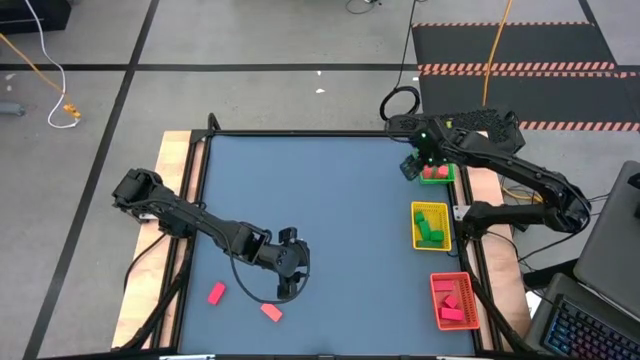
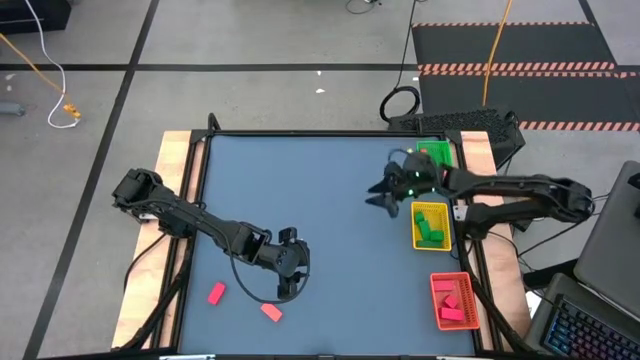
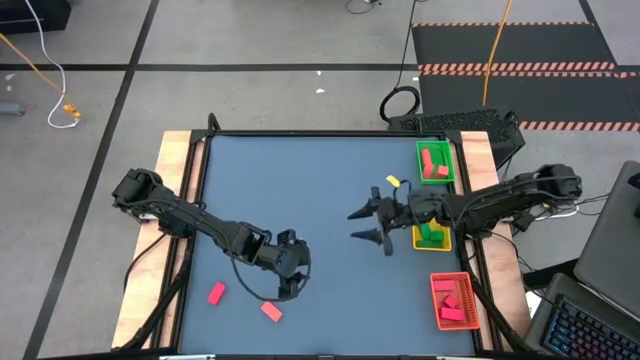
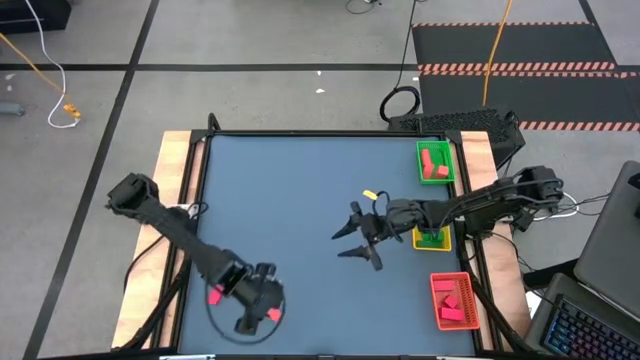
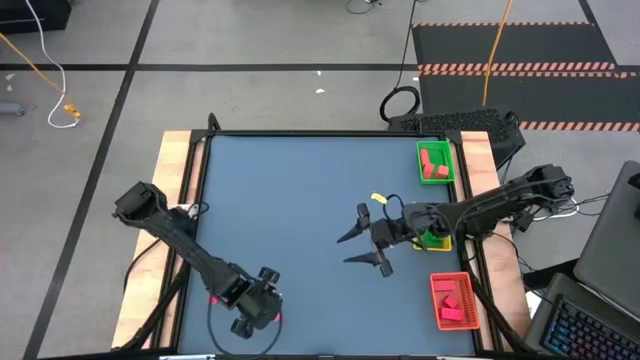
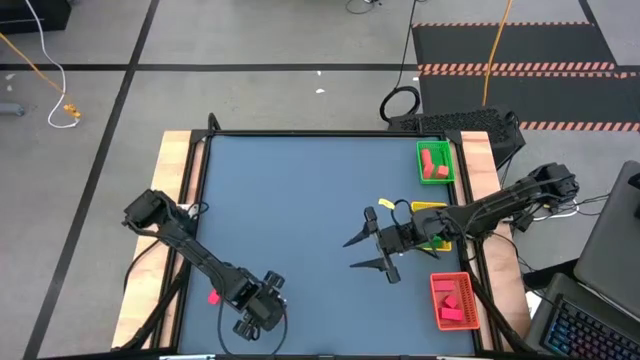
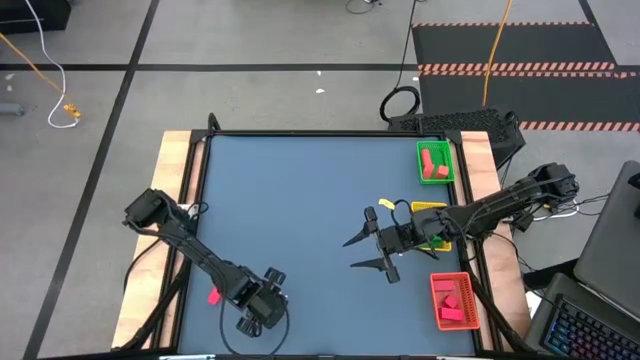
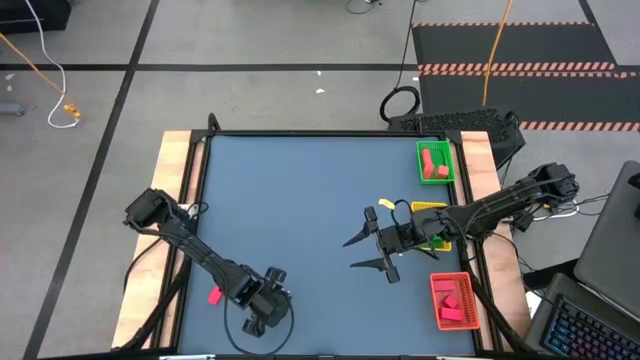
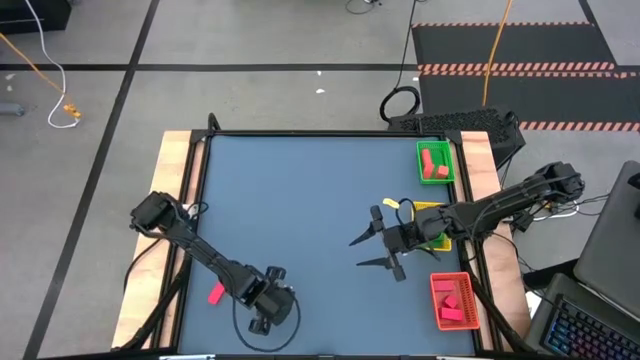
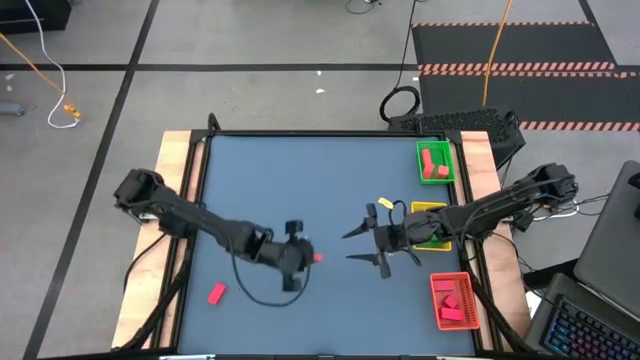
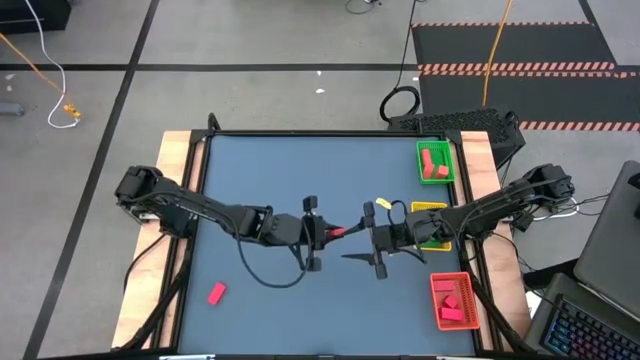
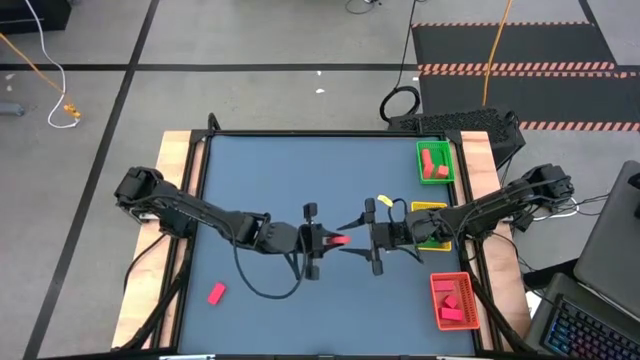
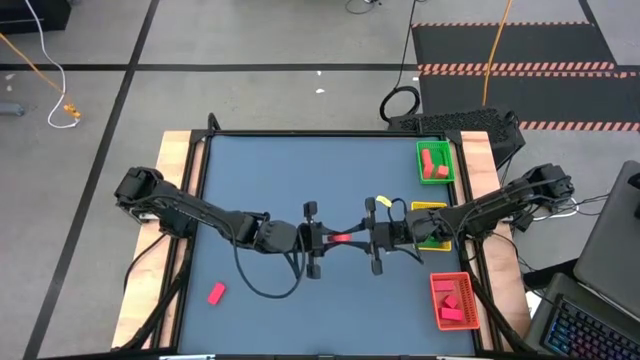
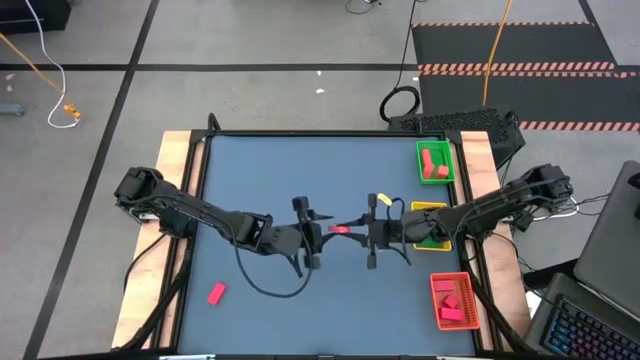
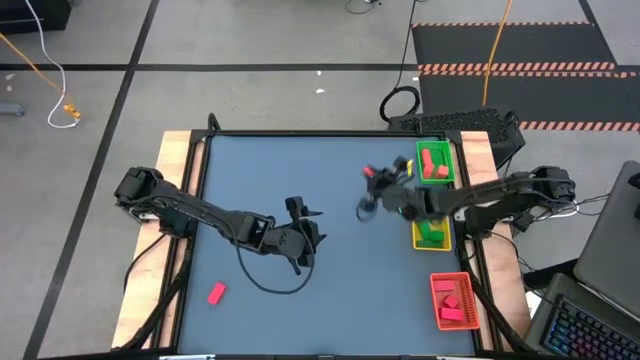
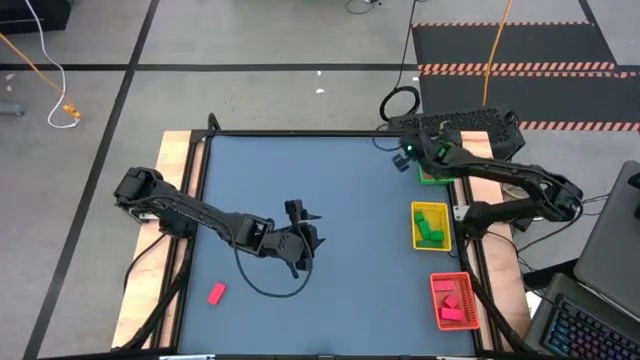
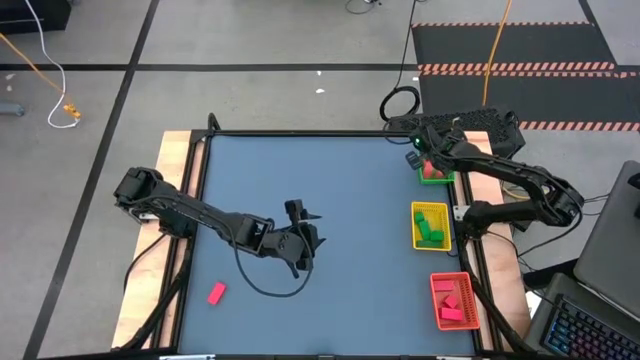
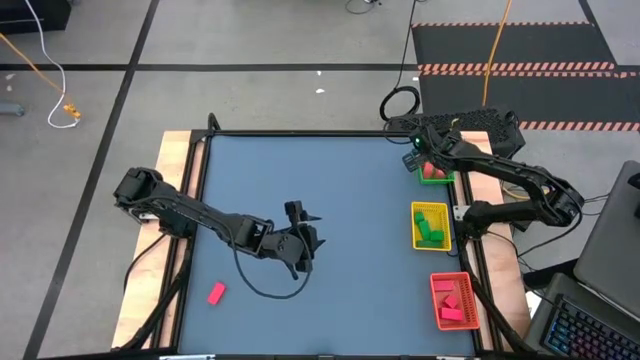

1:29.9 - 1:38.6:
Task: Sort & place blocks by color
Put orange block into the green basket

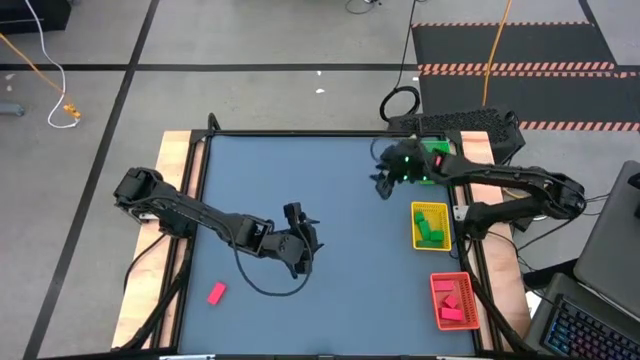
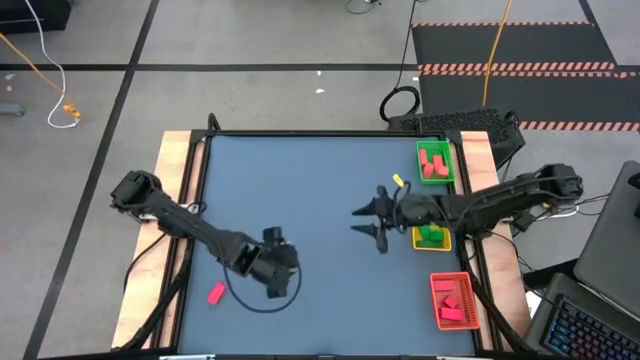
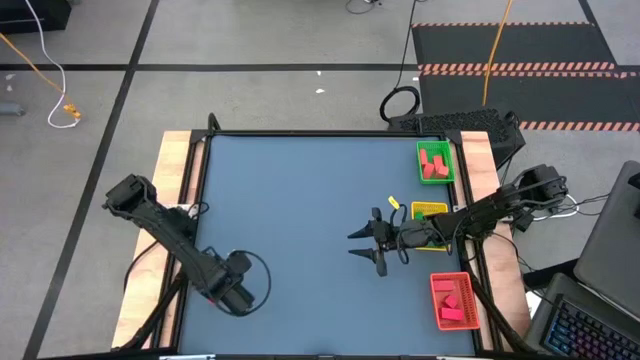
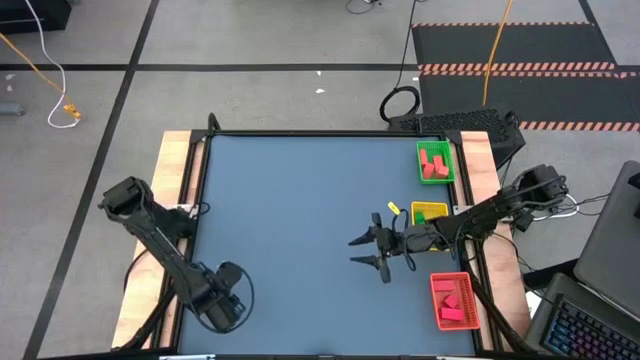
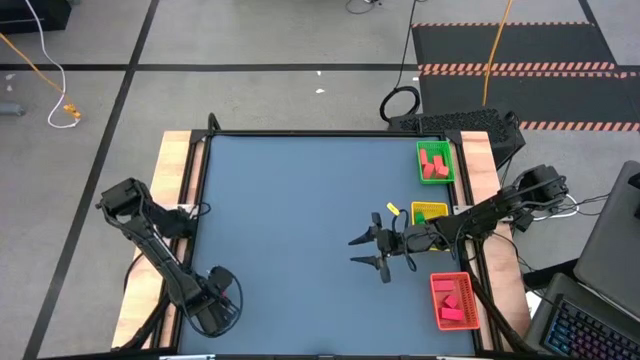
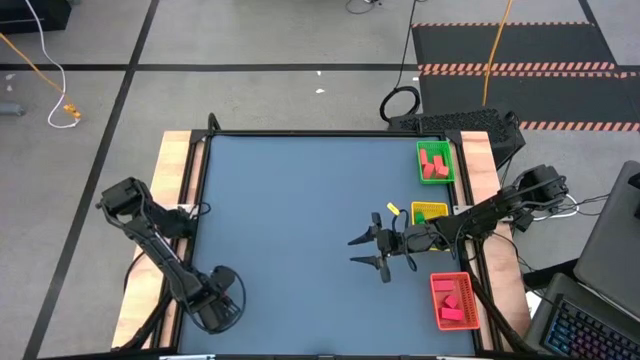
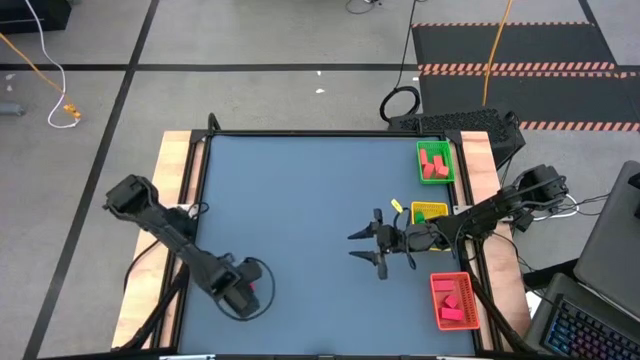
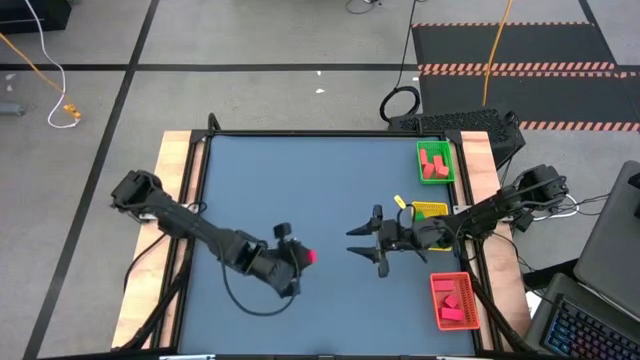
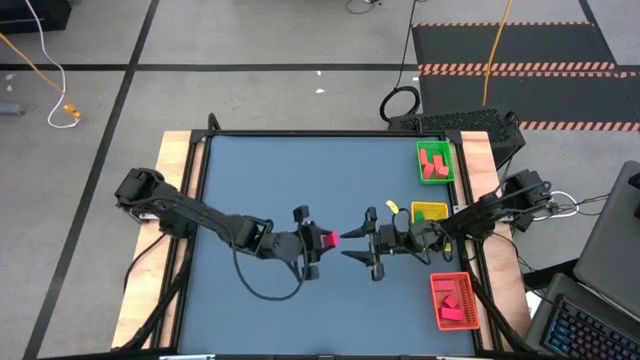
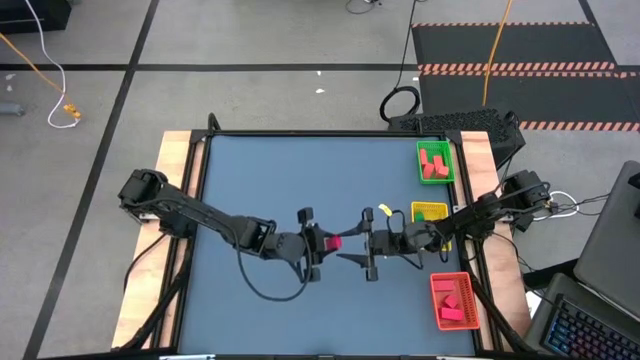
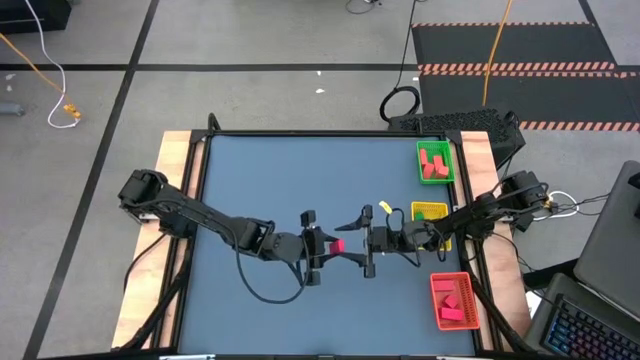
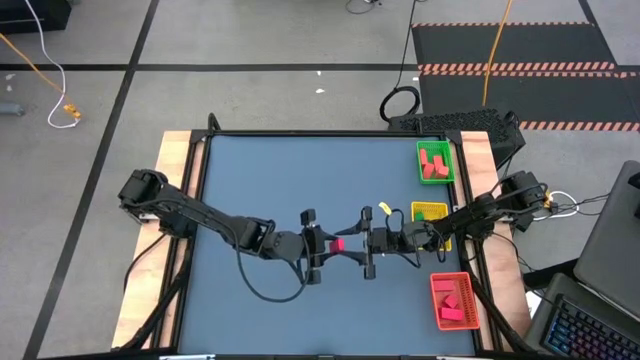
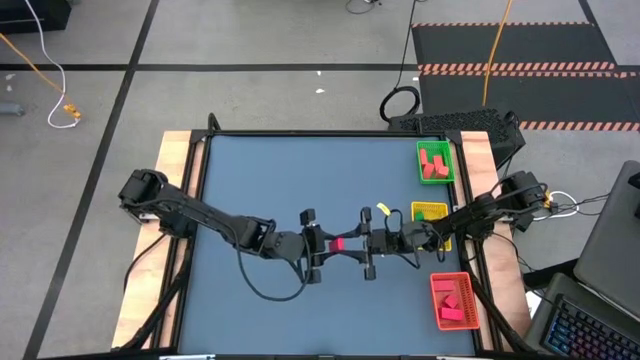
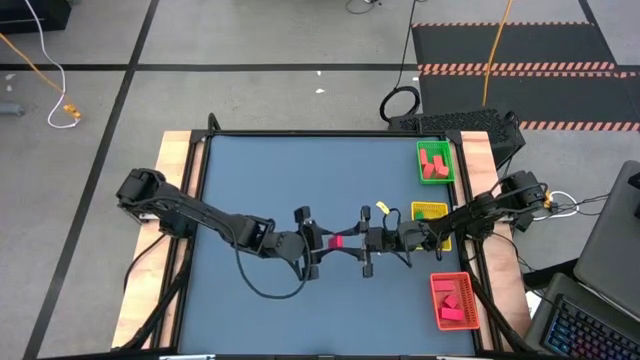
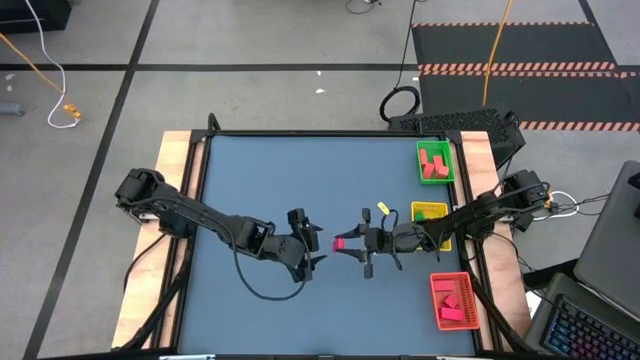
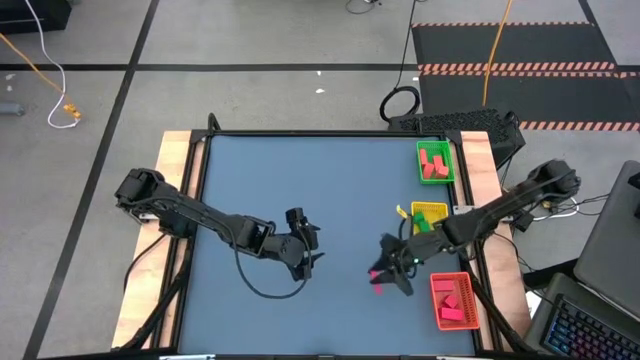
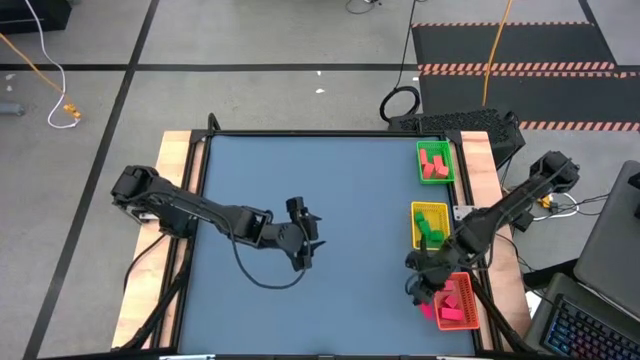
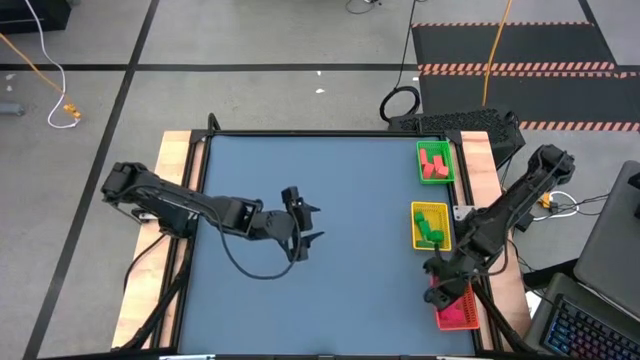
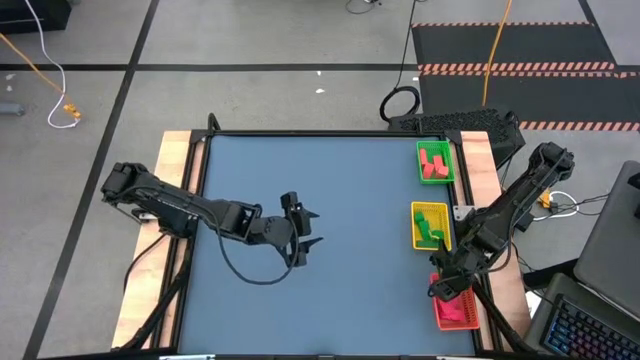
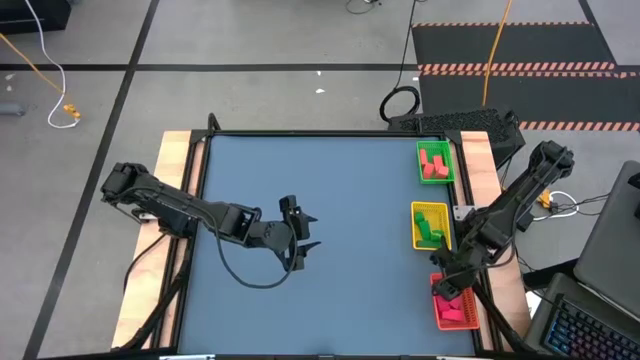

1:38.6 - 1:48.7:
Put the red block into the orange basket

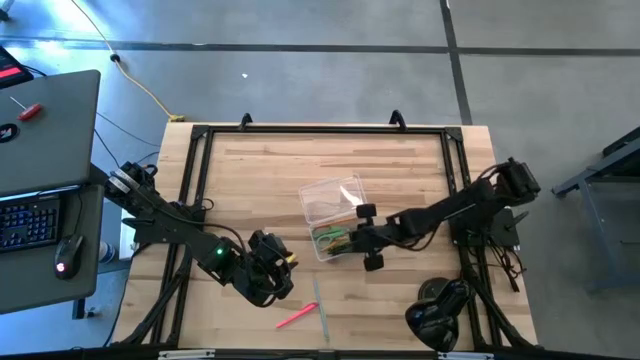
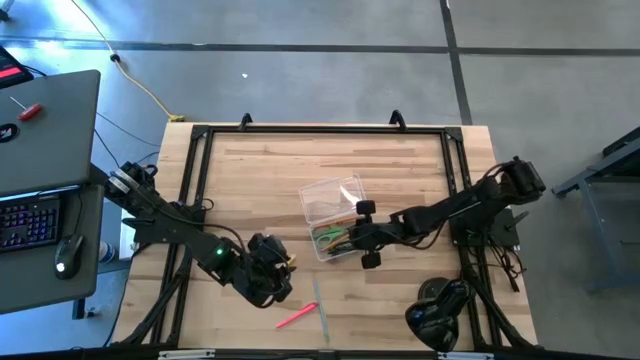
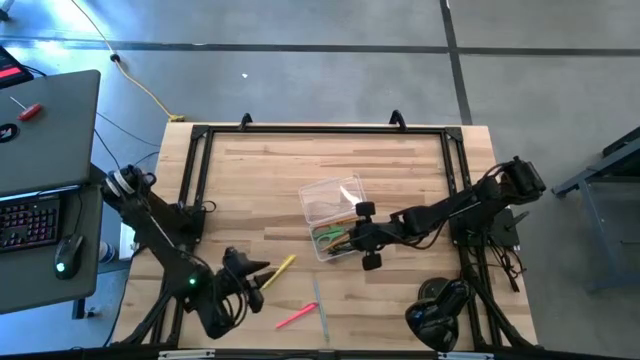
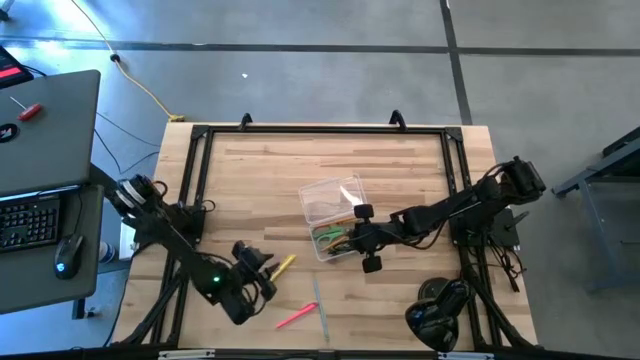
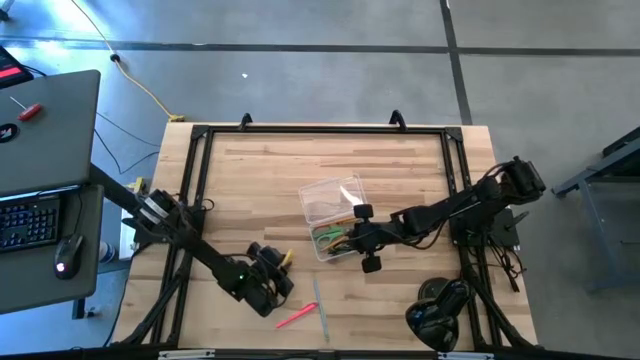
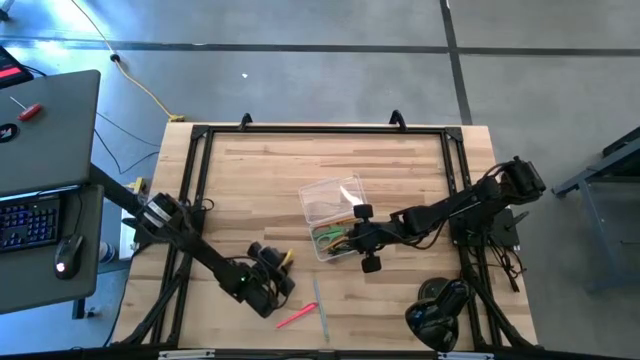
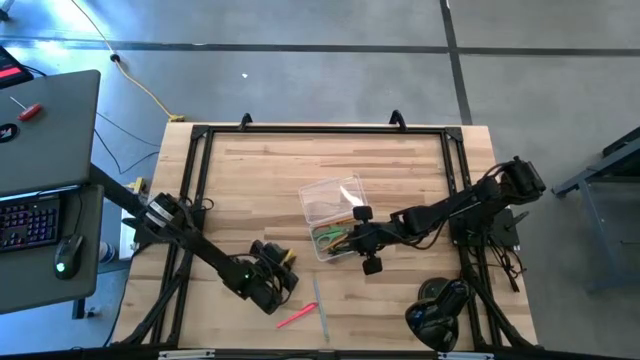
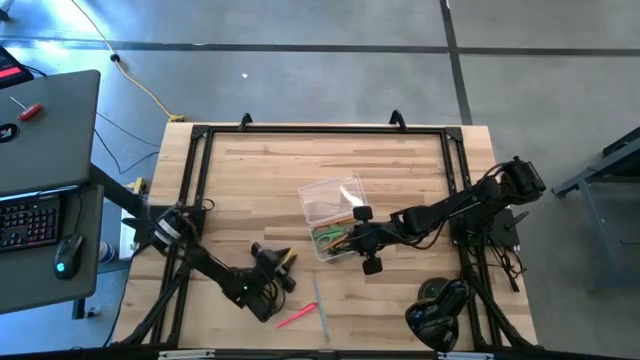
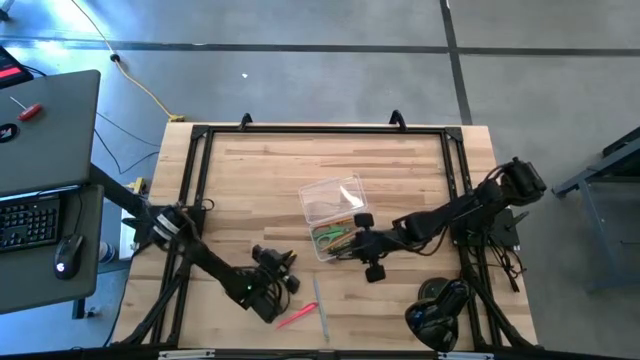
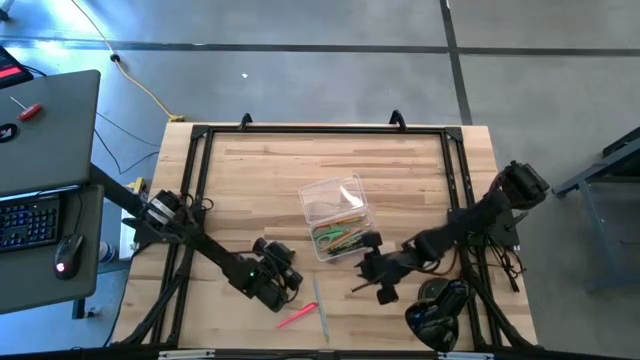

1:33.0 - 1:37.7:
Task: Pick & place school supplies into a supply box
Put the yellow pen into the supply box
